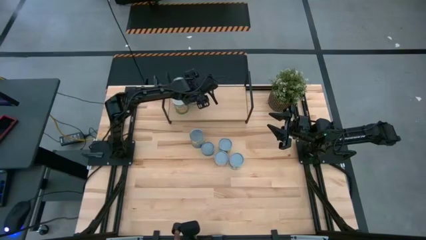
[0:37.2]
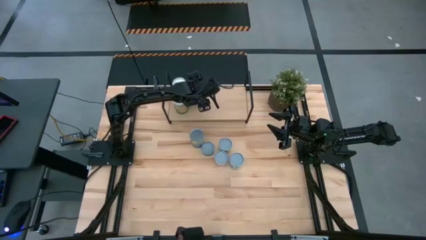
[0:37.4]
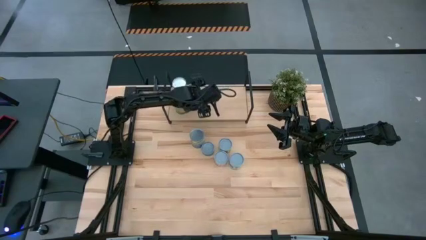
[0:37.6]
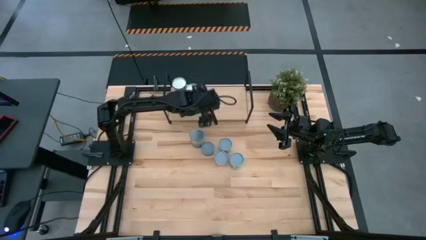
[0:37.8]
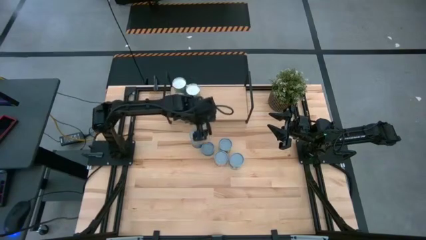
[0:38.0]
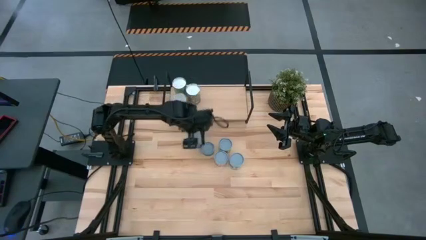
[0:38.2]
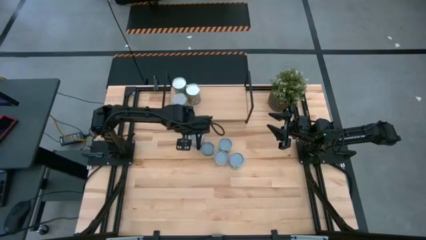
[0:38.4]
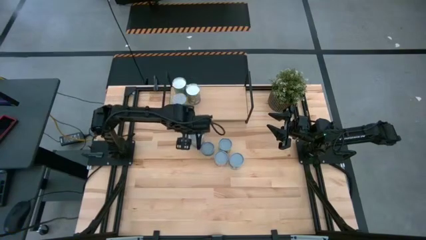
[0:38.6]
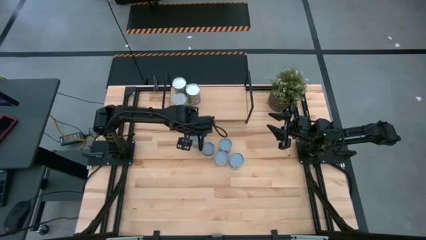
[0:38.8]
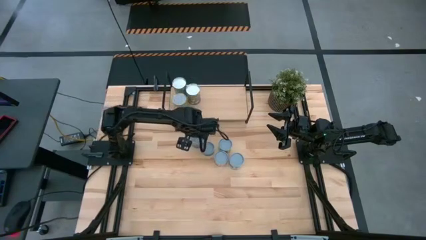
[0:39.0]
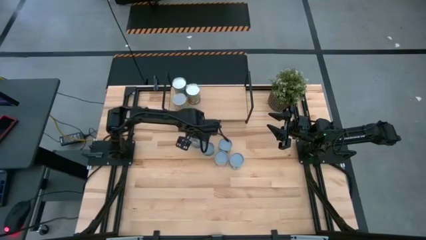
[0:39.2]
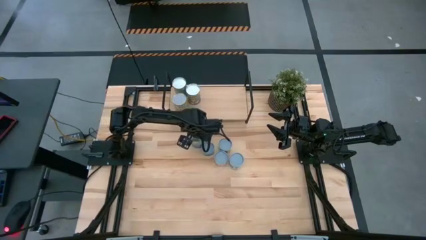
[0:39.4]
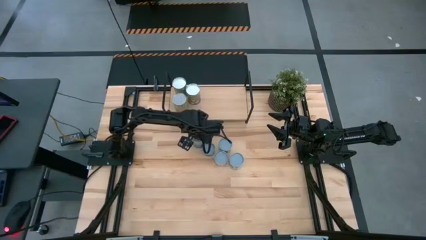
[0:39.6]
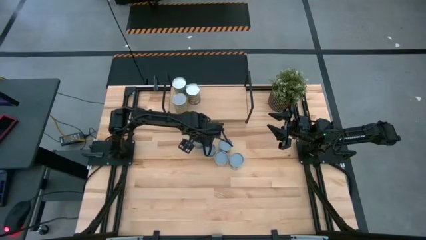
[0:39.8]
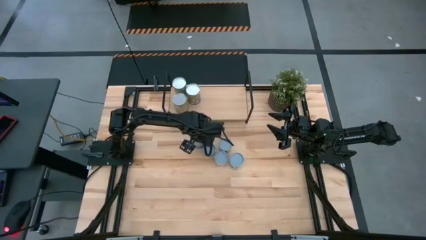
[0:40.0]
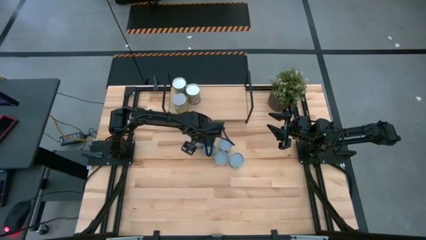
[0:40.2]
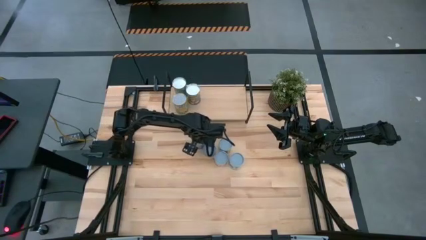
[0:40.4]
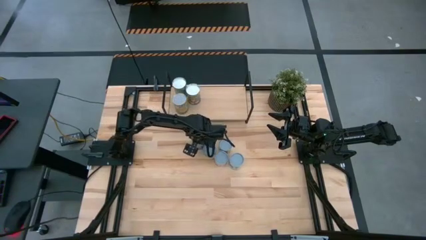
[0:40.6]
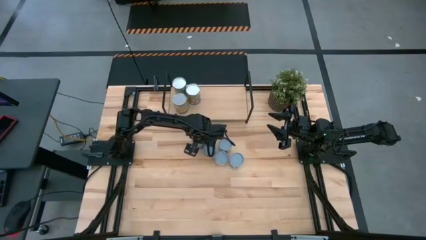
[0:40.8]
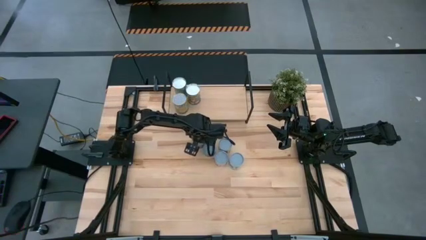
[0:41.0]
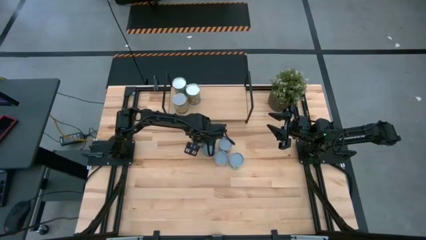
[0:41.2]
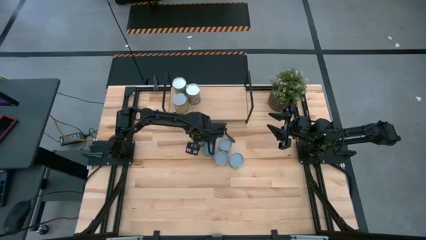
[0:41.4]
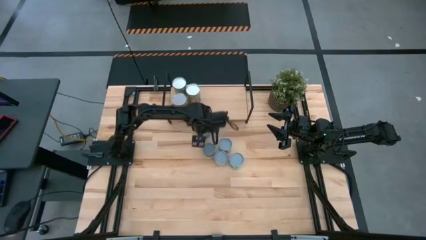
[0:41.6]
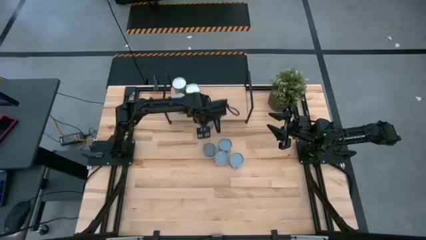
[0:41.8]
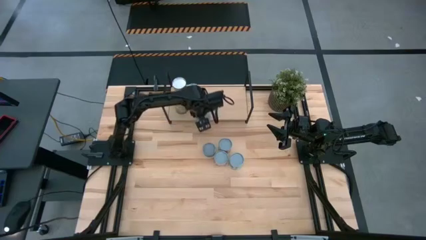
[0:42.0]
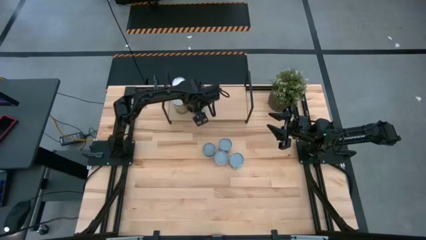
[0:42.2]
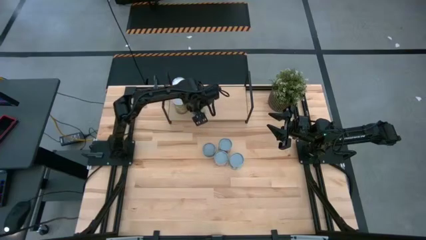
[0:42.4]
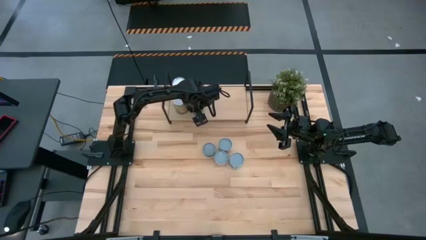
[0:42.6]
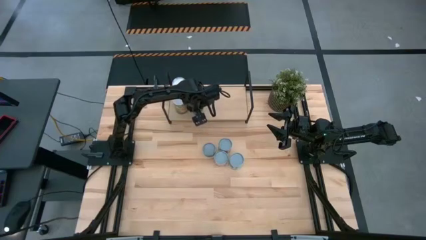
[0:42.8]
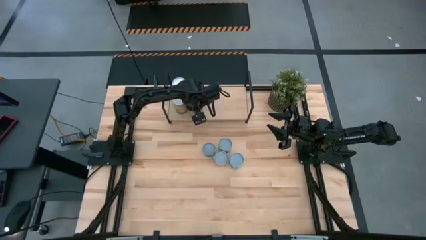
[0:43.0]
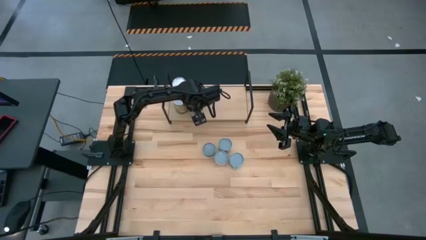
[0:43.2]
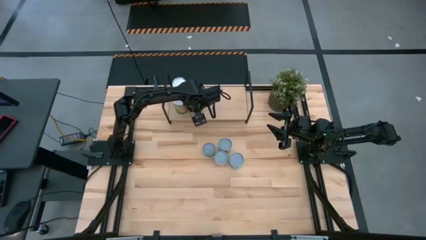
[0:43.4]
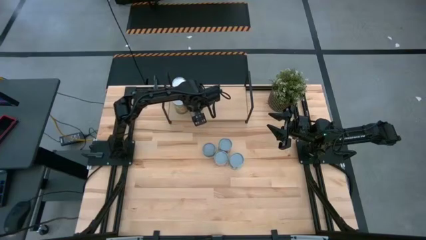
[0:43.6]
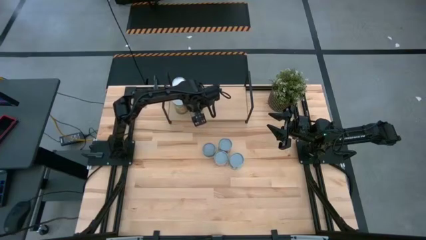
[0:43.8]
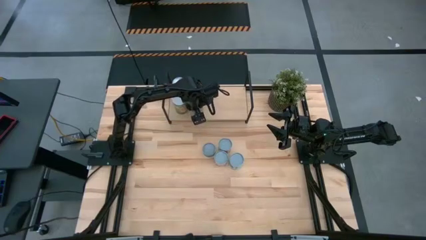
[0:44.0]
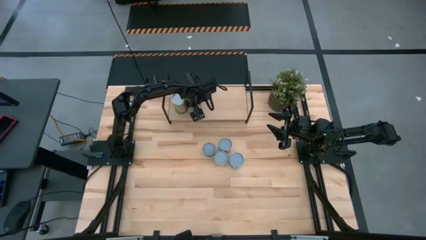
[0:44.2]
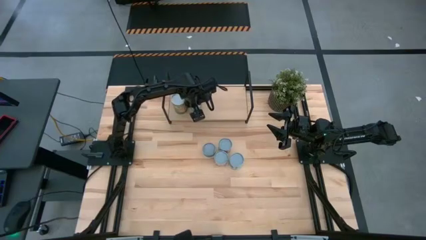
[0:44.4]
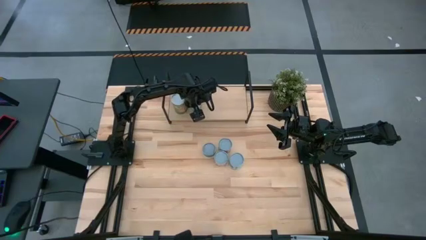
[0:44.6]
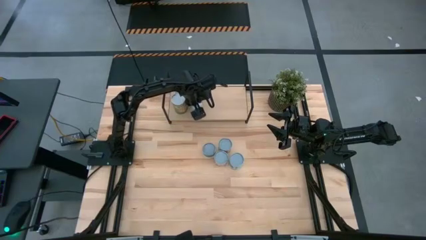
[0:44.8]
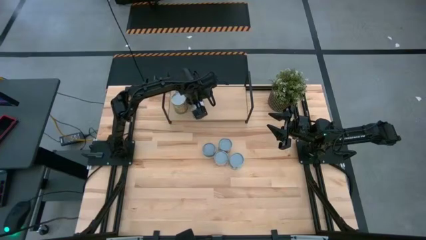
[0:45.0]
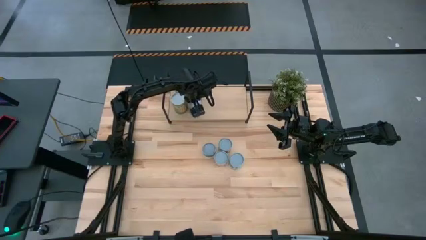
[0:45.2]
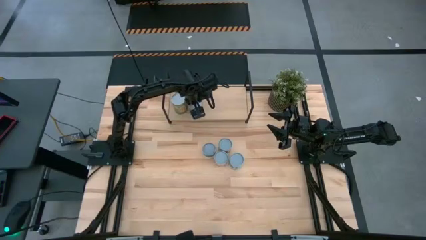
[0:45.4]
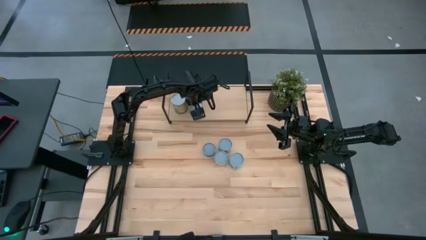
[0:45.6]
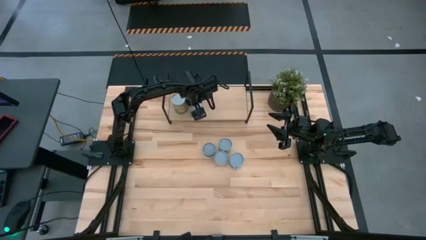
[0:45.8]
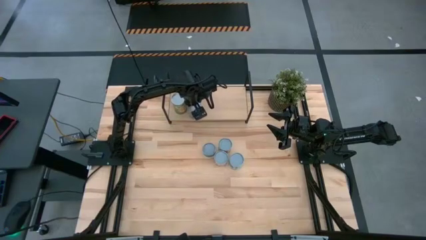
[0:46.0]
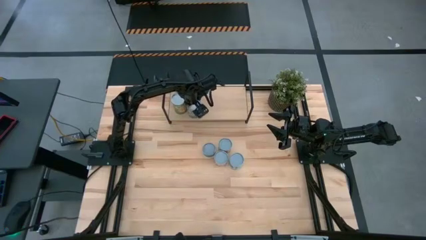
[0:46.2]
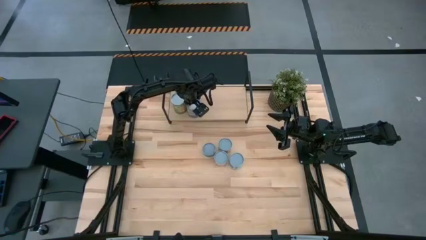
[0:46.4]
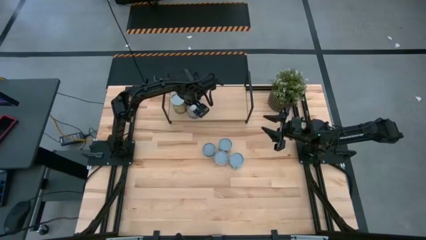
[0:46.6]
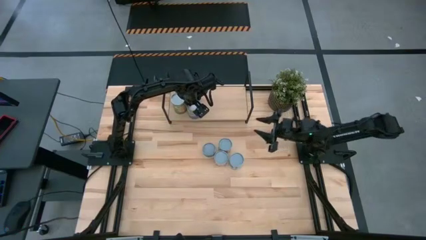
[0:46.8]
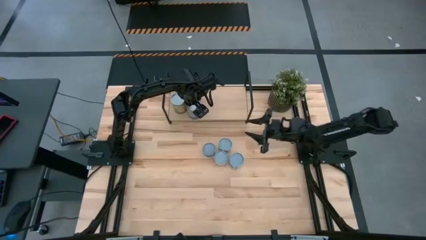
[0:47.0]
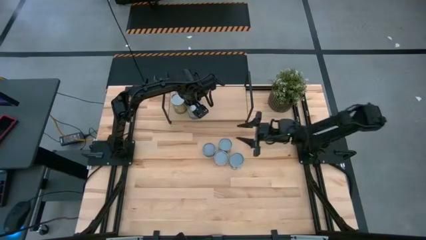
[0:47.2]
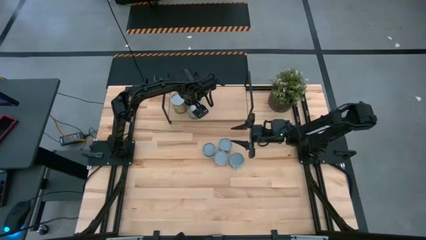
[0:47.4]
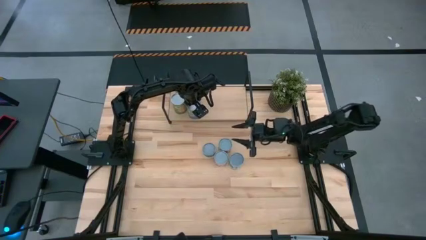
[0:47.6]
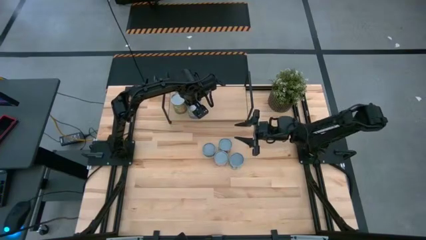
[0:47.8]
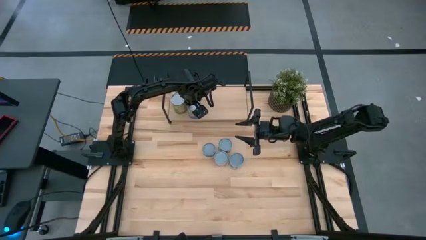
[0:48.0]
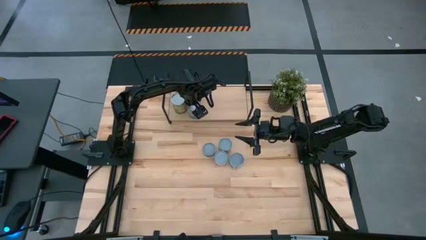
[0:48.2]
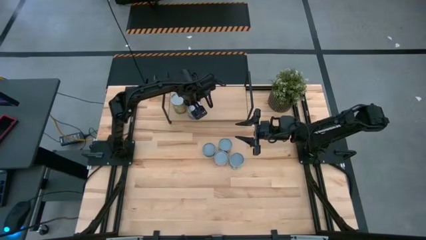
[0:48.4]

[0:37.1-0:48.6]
Task: Pick and place cans onto a shelf
Put the canned peas on the shelf
